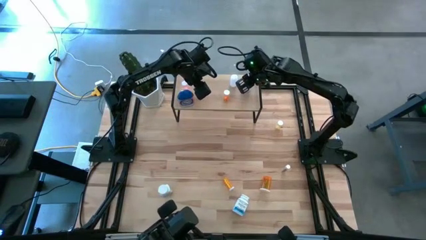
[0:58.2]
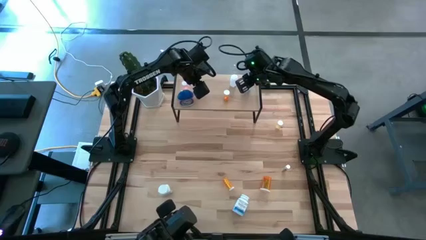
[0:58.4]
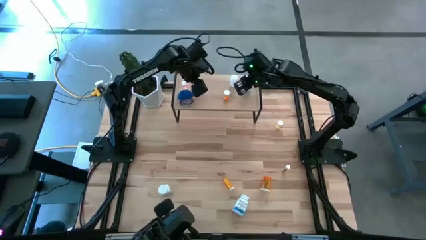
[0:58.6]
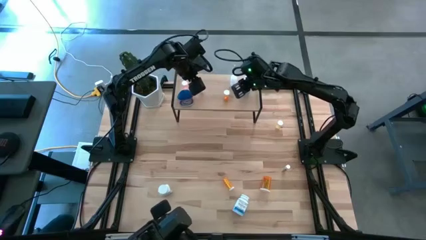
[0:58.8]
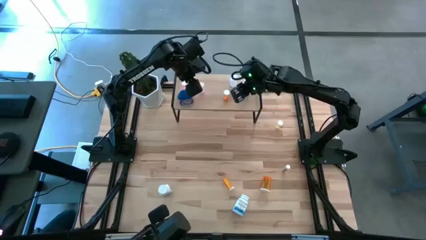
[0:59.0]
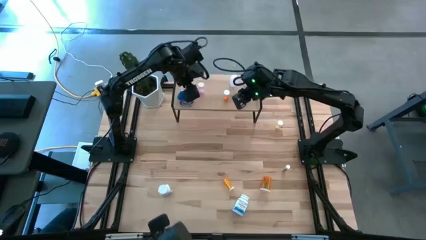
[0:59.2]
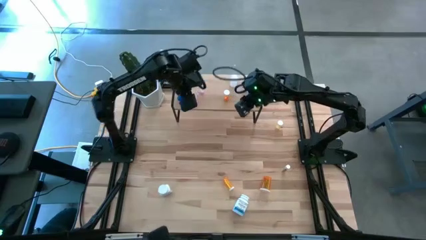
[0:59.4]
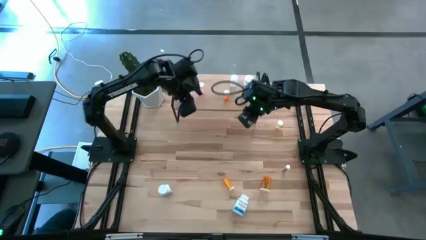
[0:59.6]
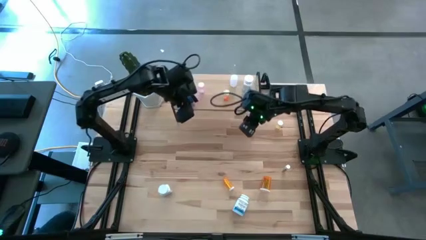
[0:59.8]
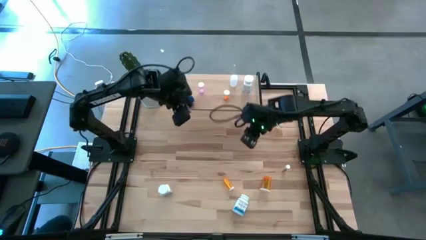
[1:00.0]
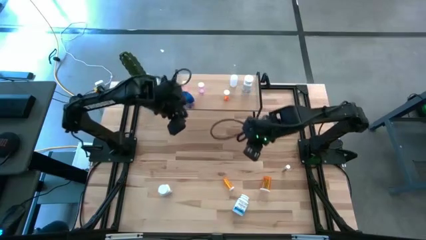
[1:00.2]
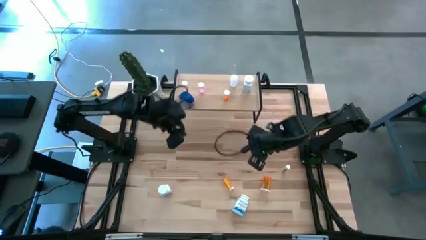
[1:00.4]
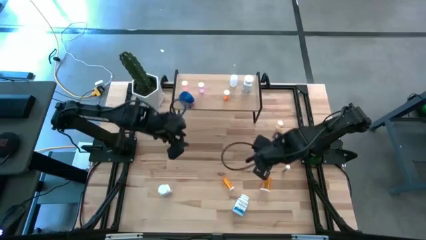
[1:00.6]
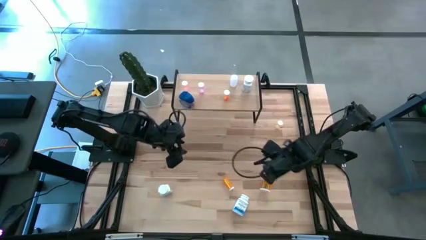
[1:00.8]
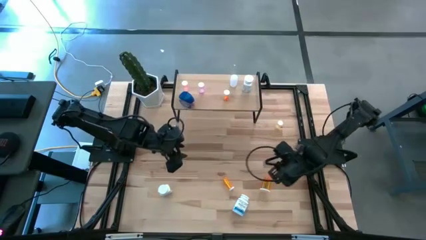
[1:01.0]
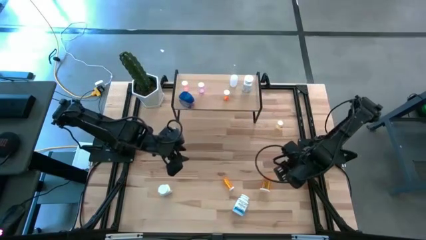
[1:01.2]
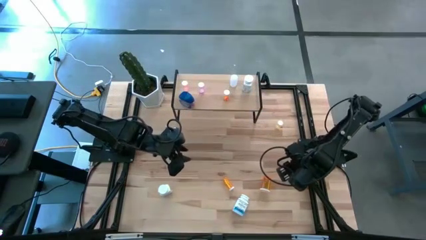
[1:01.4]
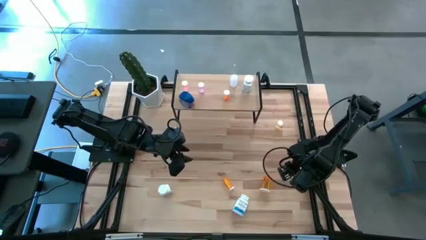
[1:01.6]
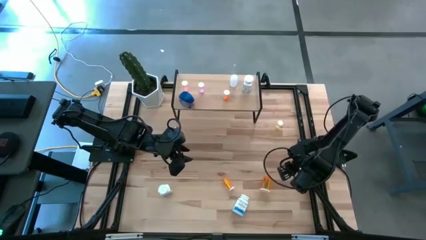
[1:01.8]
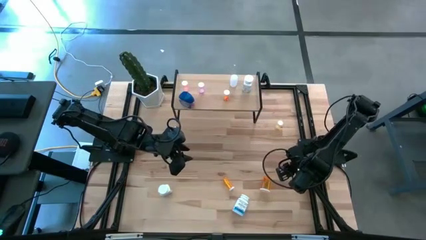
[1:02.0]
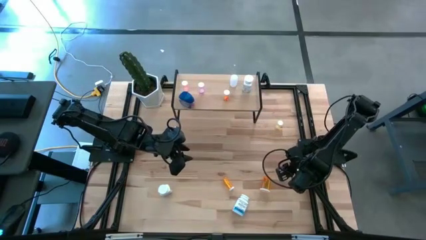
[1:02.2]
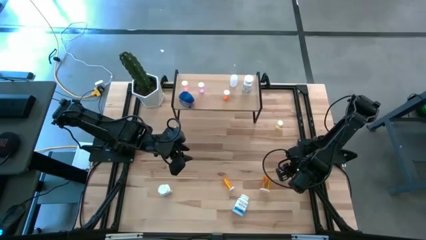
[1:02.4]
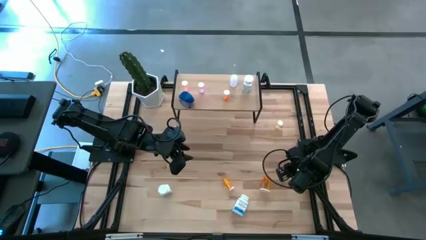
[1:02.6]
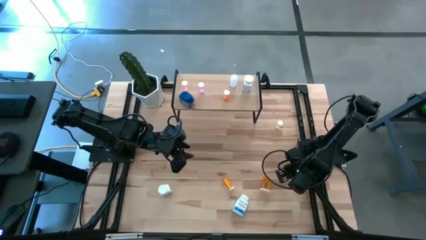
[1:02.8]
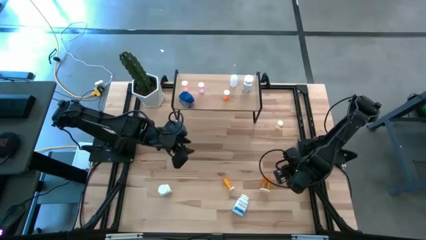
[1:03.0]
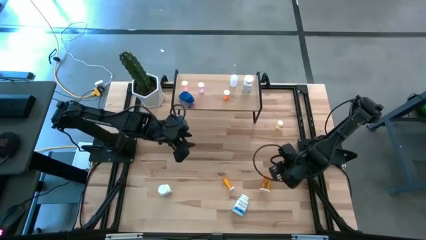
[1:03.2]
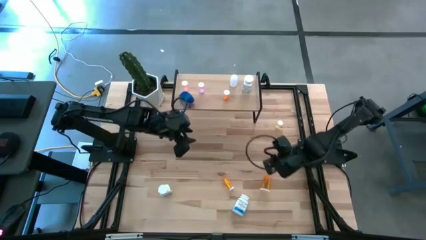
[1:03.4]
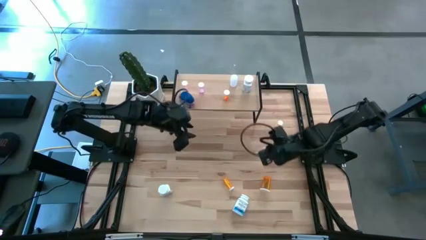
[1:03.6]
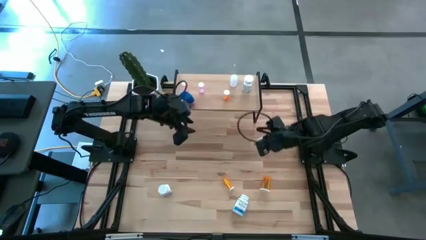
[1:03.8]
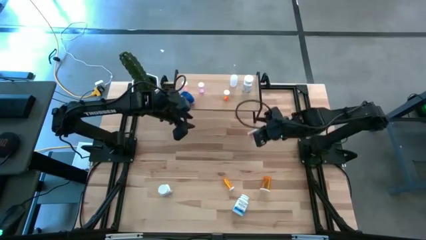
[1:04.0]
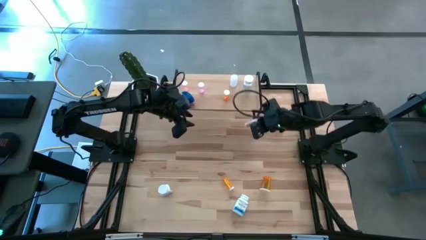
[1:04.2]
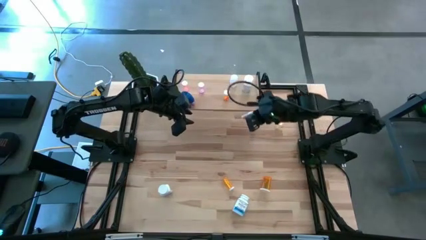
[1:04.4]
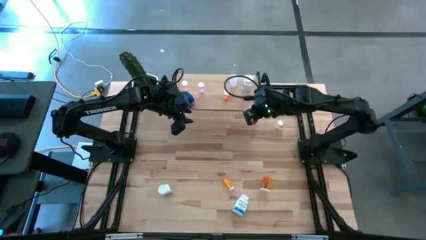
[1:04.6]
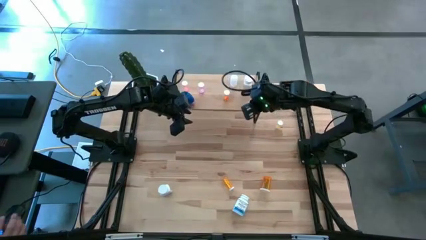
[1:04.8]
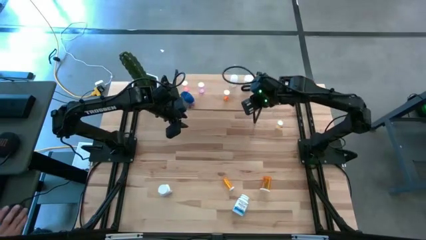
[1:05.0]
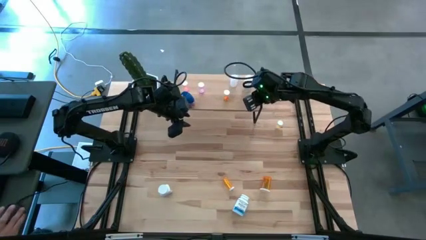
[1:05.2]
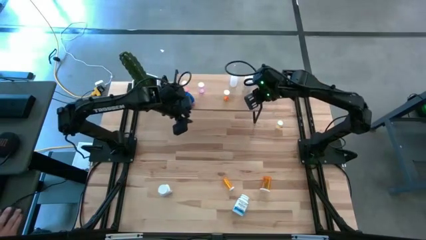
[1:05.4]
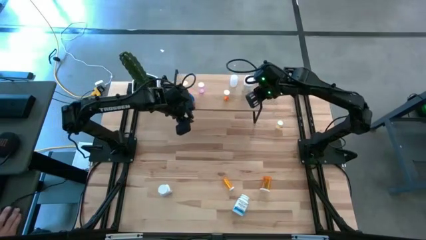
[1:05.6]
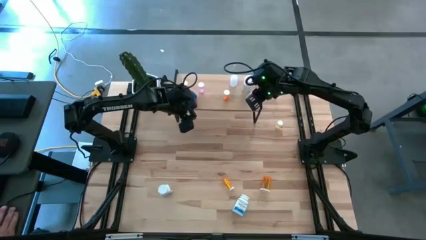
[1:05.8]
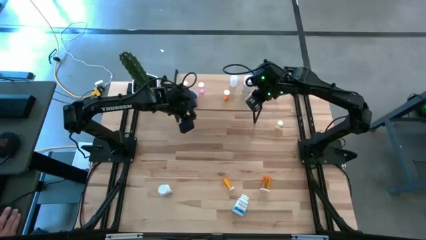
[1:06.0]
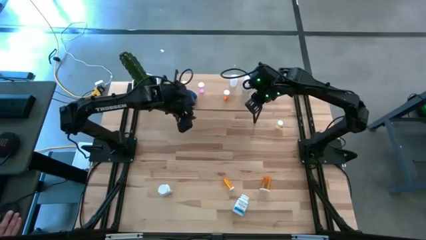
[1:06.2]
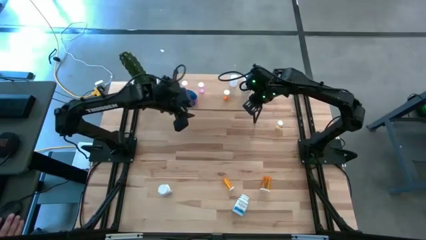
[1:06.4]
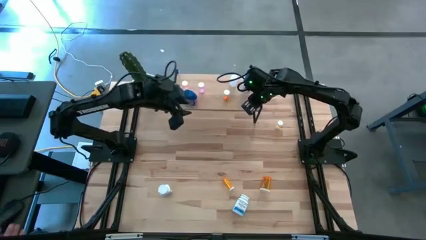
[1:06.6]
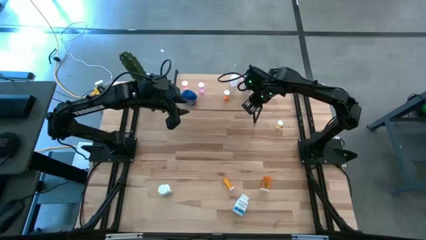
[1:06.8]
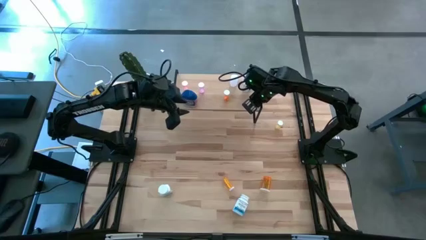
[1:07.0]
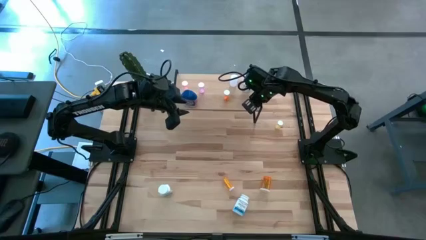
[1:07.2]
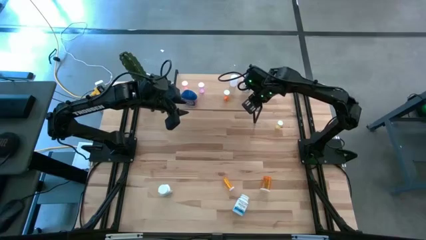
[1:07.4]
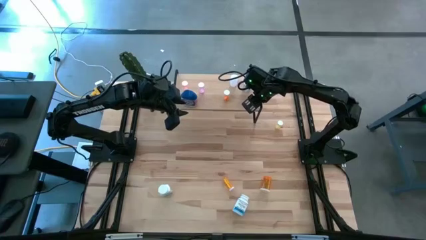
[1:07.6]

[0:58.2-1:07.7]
Task: Pick and place medicine bottles onto shelf by color
Put the white small pill bottle on the shelf

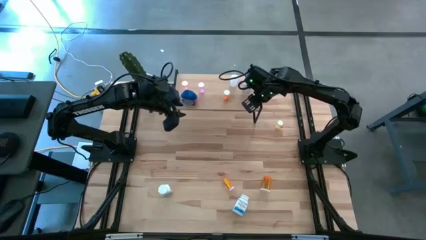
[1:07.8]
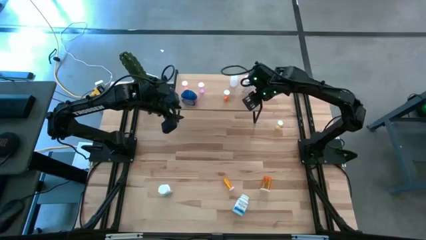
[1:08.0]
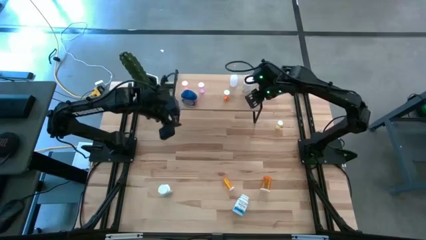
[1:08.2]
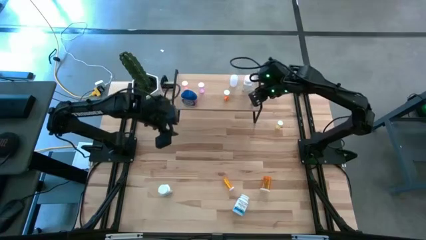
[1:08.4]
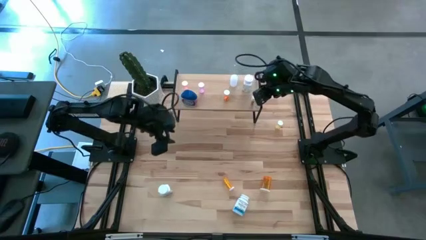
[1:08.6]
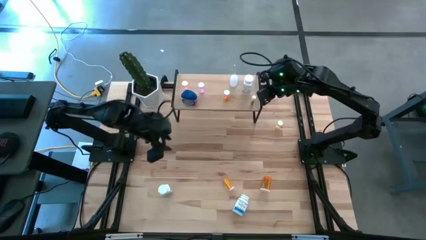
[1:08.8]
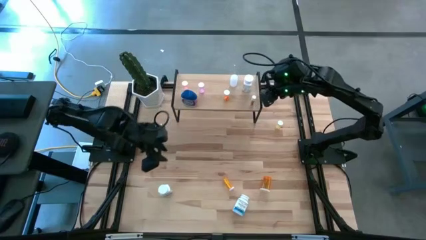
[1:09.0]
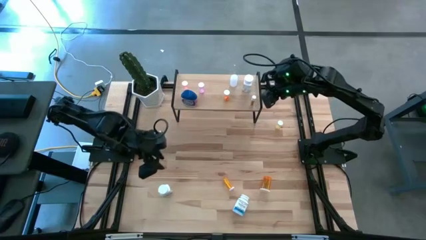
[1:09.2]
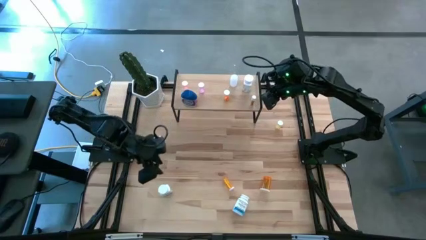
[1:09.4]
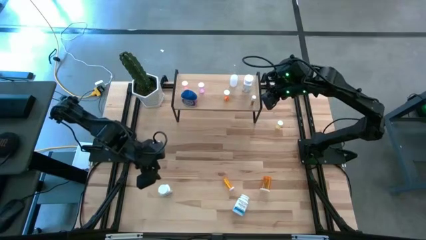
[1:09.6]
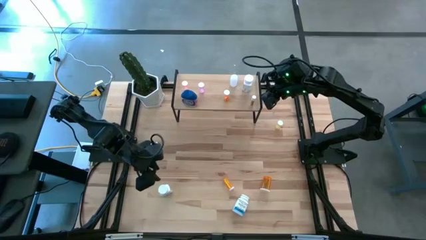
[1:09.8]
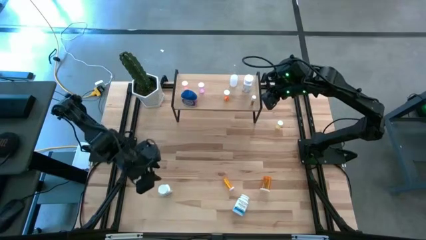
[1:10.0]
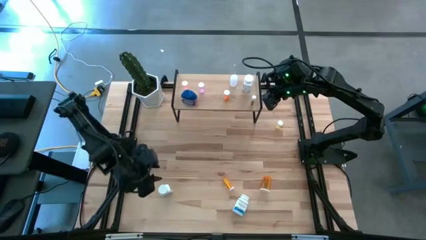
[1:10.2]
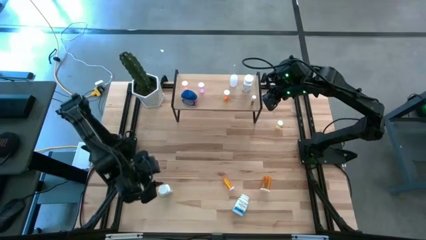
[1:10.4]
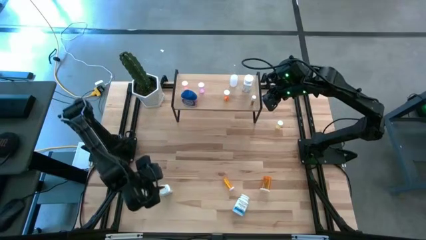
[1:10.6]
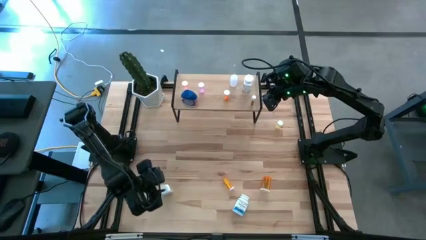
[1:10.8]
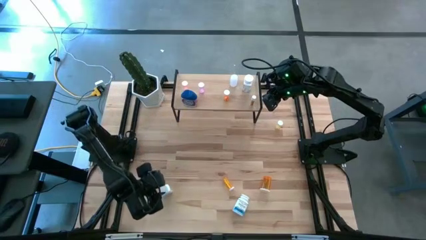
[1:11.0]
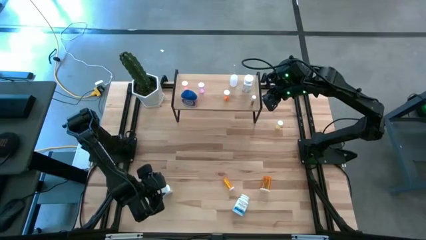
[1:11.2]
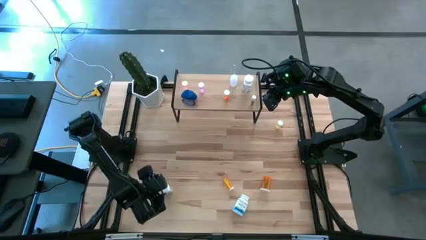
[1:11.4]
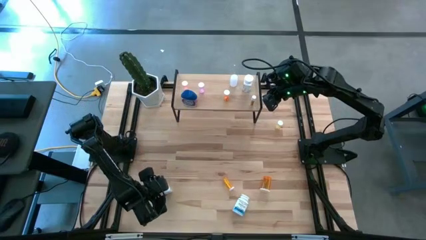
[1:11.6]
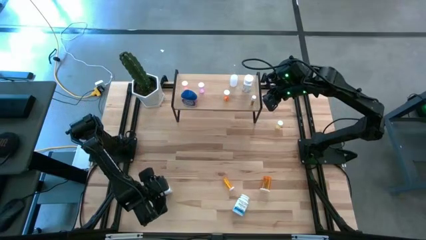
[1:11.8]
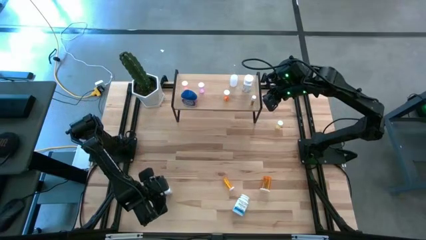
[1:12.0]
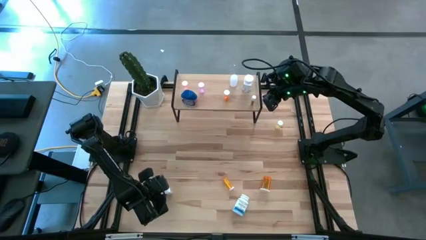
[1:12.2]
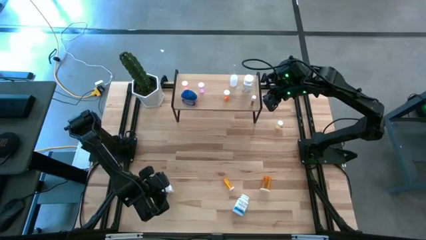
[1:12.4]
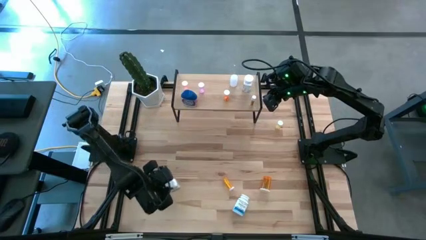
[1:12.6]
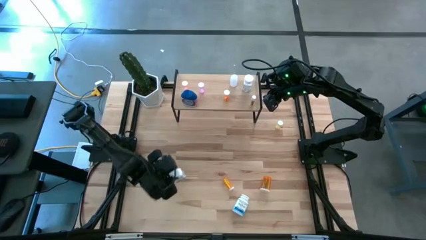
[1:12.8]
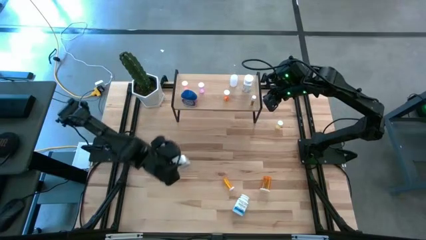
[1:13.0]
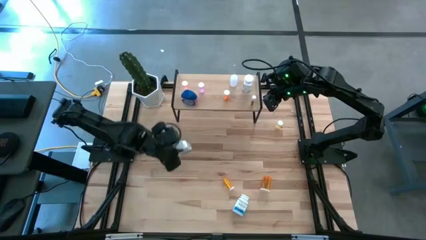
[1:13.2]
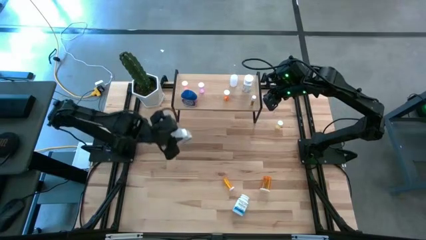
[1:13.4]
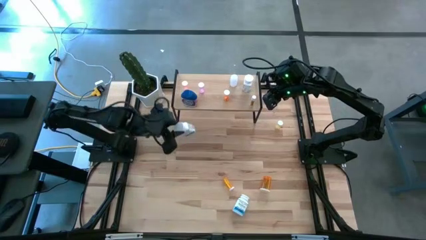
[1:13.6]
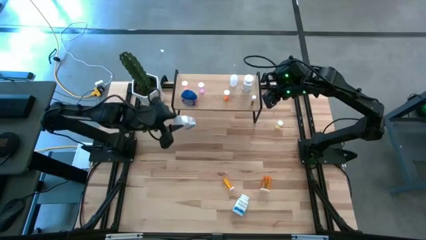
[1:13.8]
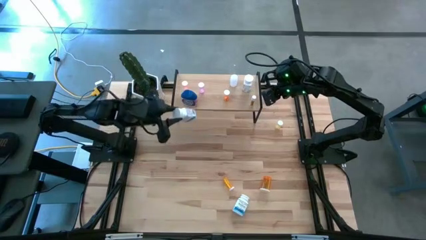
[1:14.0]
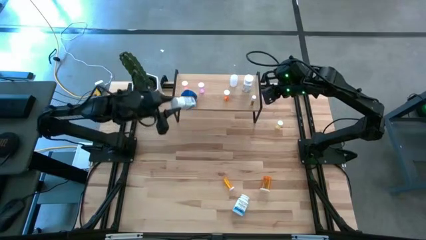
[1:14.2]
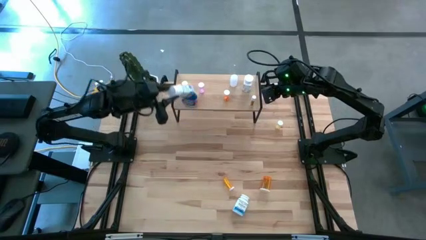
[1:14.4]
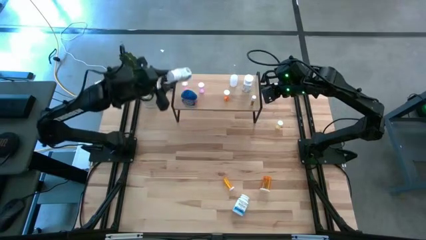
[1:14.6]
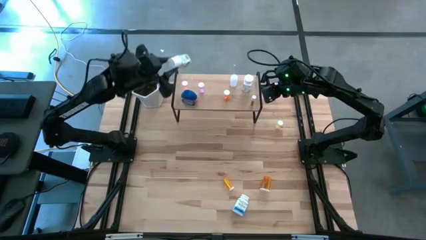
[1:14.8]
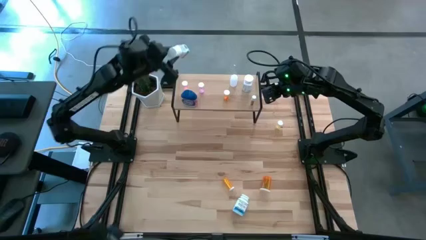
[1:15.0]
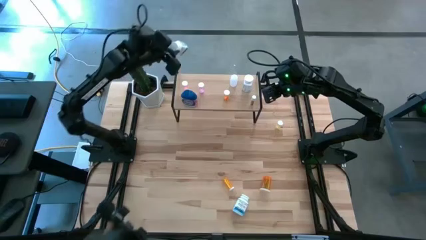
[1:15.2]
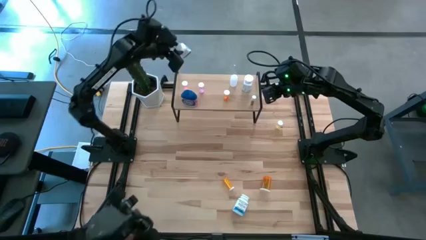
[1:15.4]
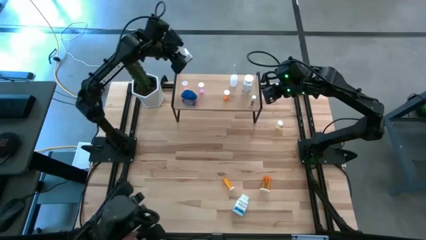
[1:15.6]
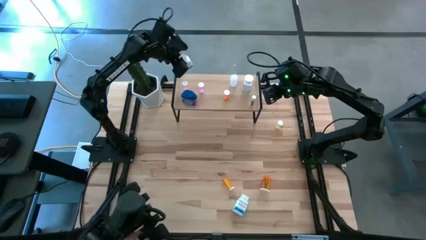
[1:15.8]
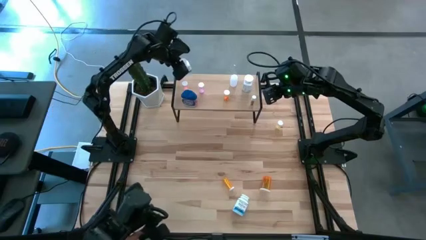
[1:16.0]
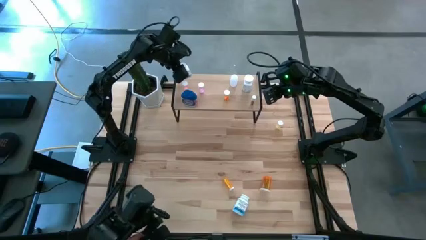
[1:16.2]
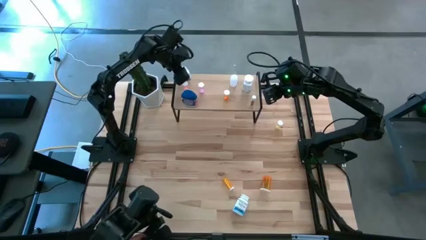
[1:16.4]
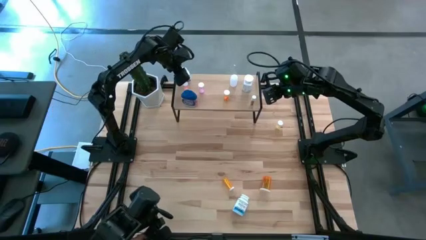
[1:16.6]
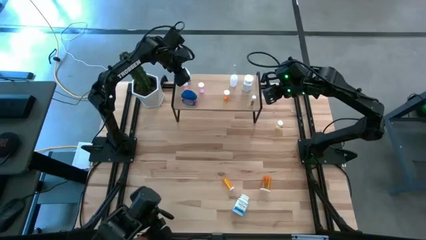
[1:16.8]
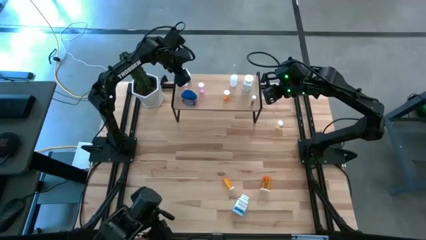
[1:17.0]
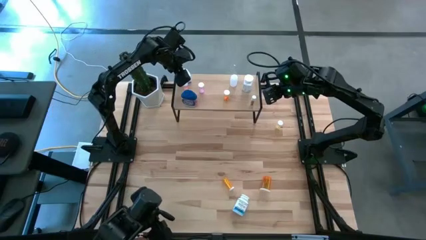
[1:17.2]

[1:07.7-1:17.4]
Put the white large pill bottle on the shelf
